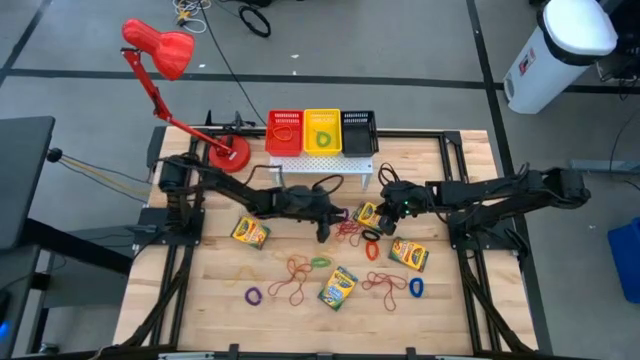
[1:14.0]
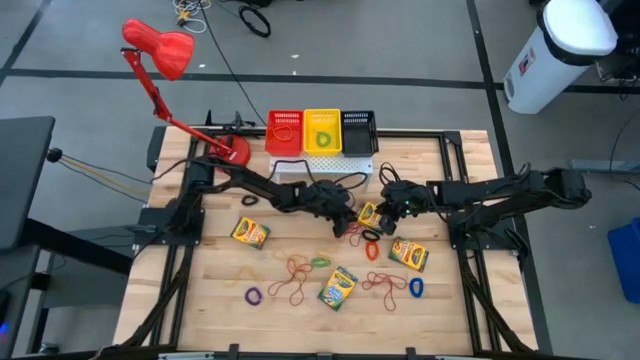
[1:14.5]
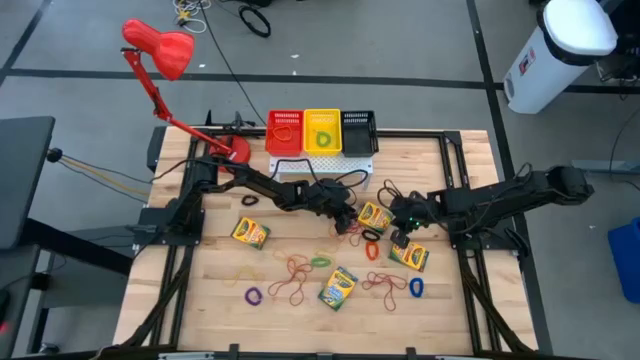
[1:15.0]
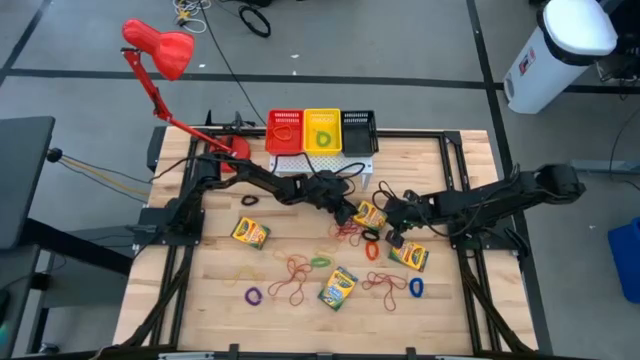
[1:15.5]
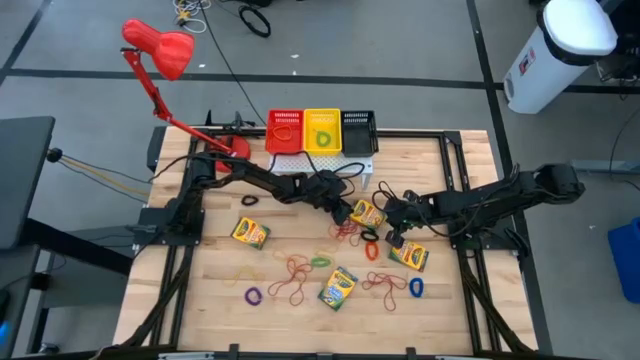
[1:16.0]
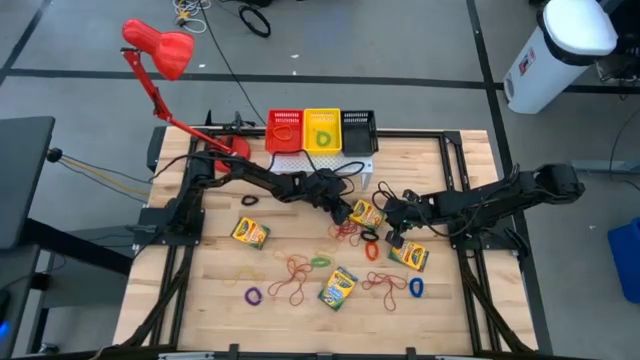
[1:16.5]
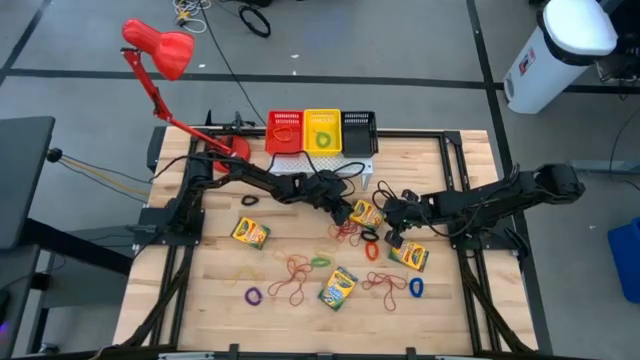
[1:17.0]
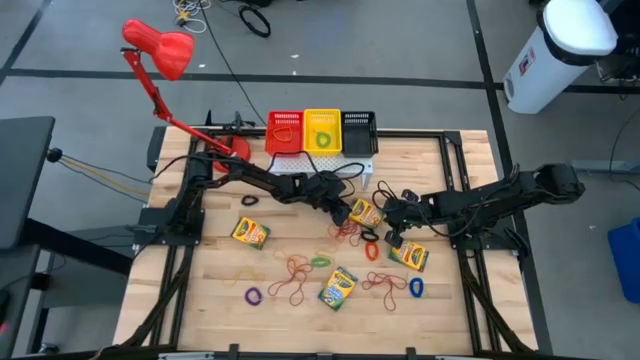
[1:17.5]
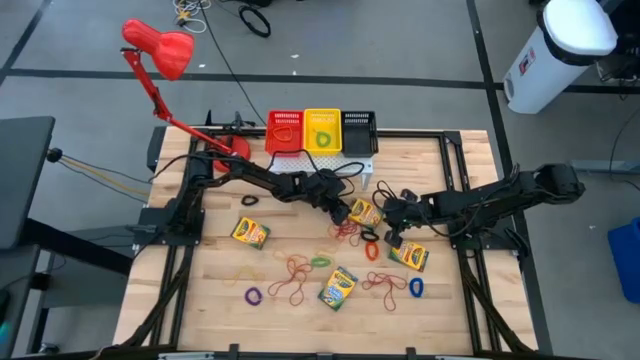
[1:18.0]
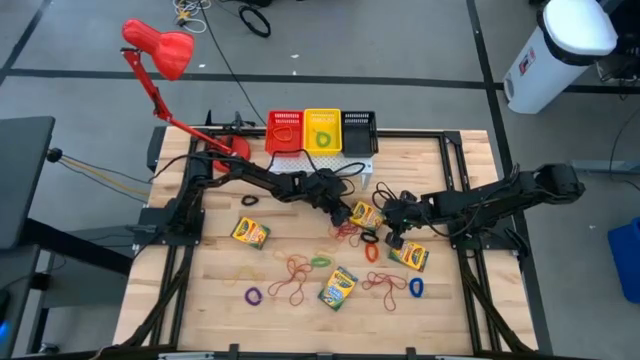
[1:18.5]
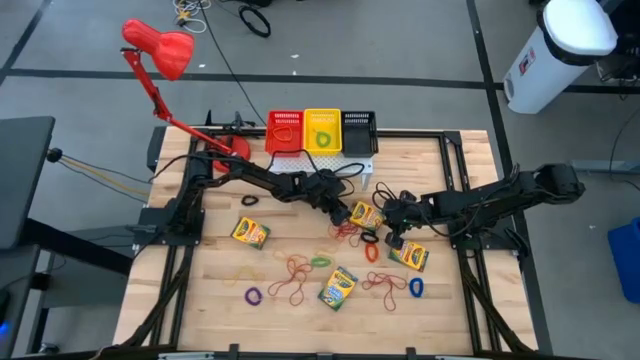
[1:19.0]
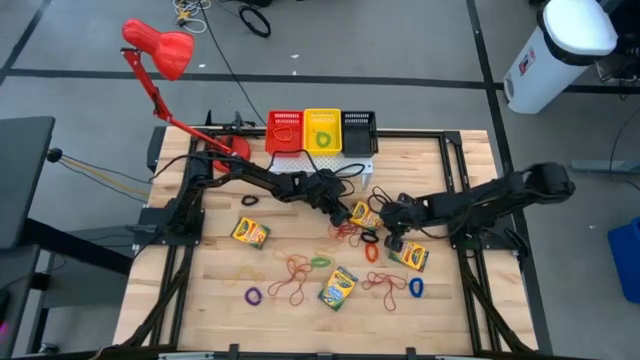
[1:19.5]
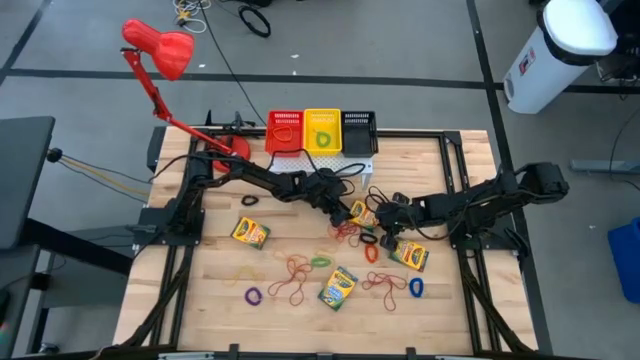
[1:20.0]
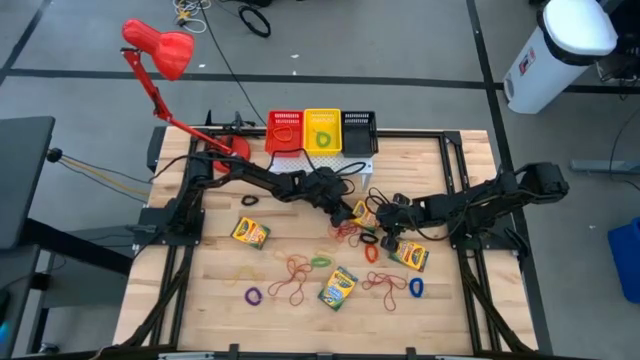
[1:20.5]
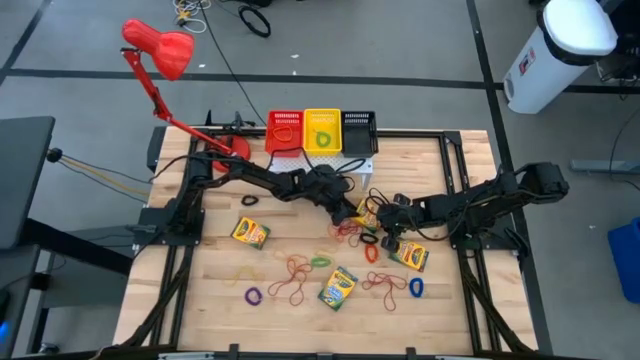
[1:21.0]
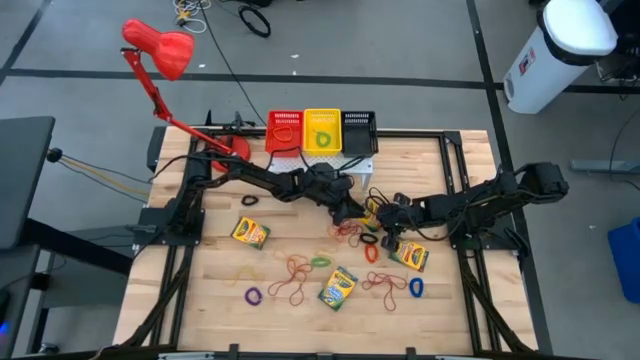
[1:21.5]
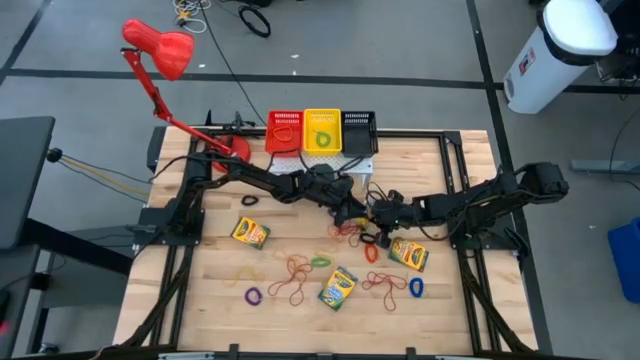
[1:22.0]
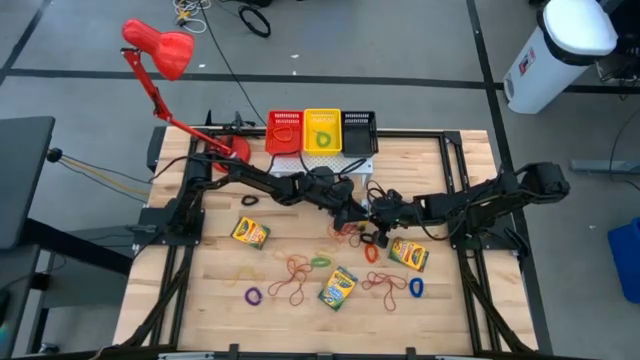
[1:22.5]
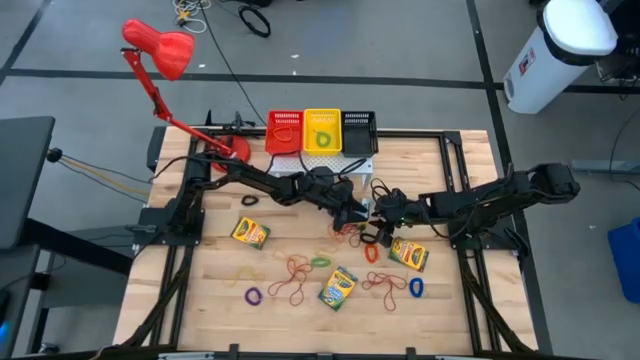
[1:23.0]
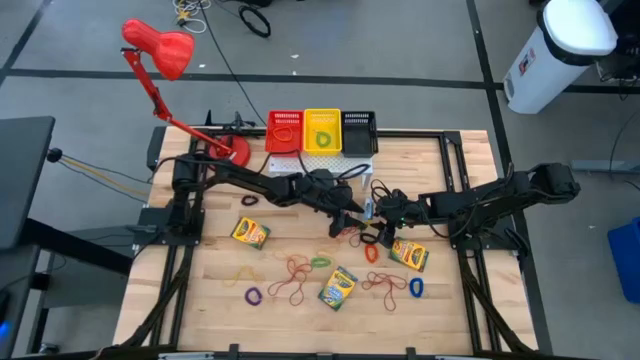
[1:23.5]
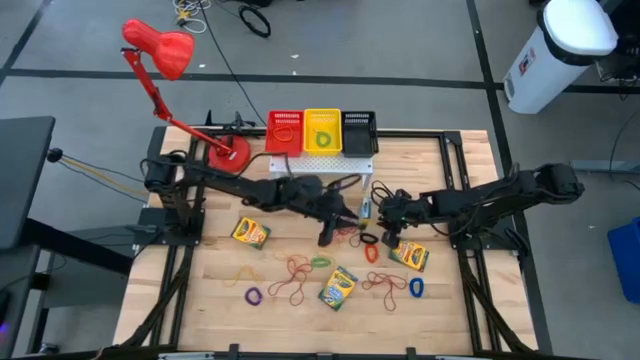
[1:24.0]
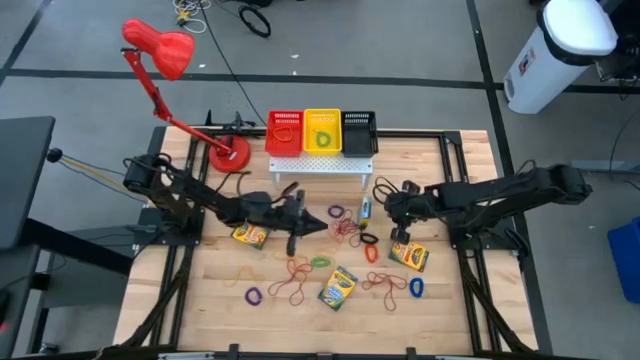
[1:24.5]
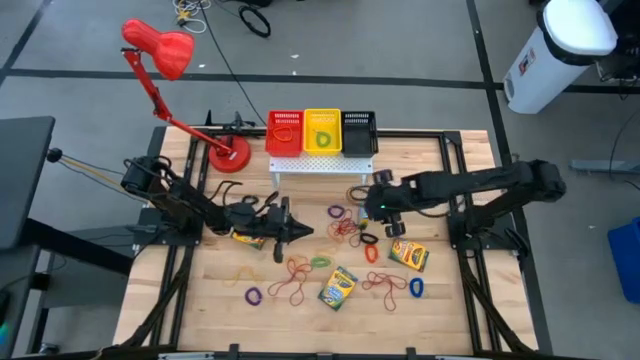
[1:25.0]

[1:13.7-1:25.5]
Task: Pick & Place Office Desk Supplies
Put the yellow crayon box into the black bin on the shelf

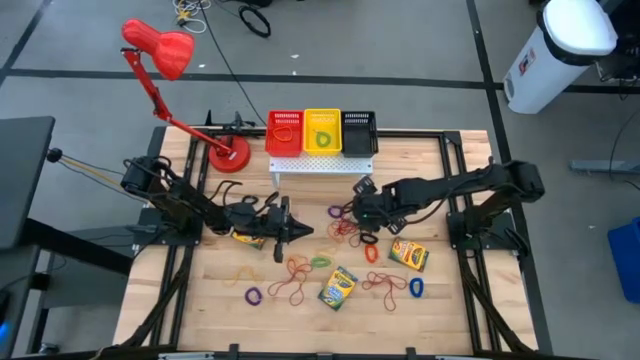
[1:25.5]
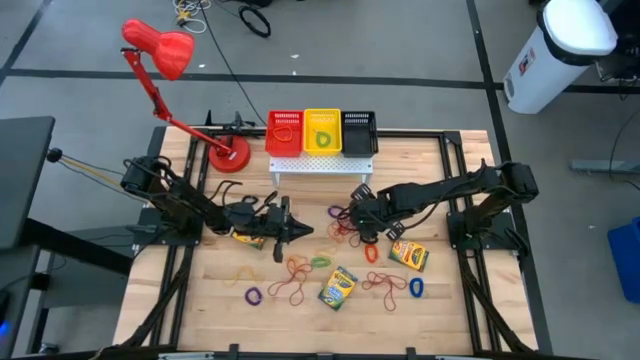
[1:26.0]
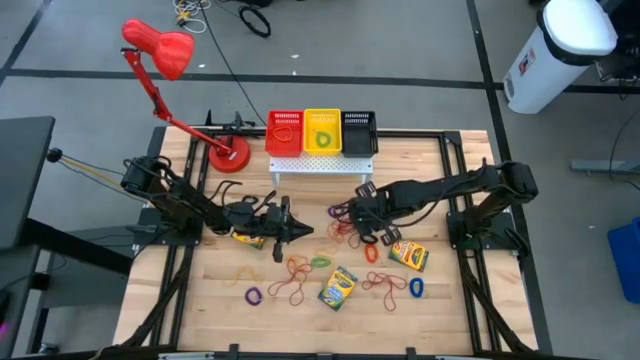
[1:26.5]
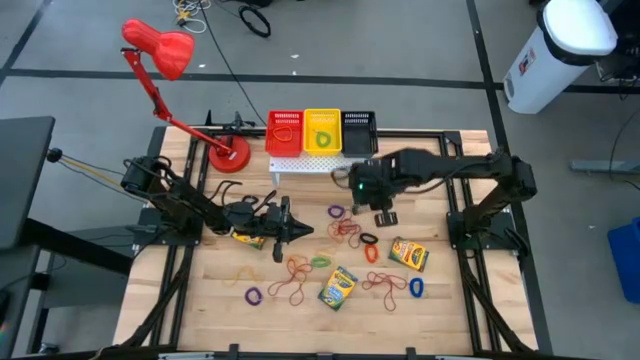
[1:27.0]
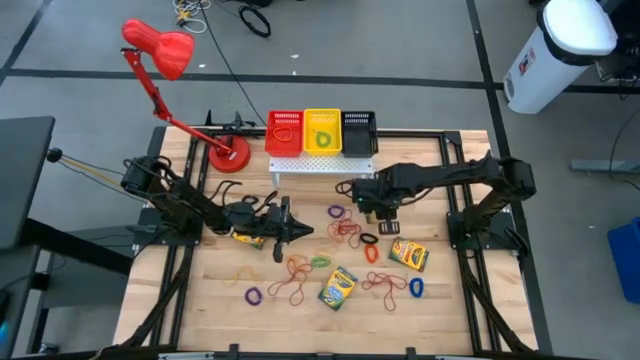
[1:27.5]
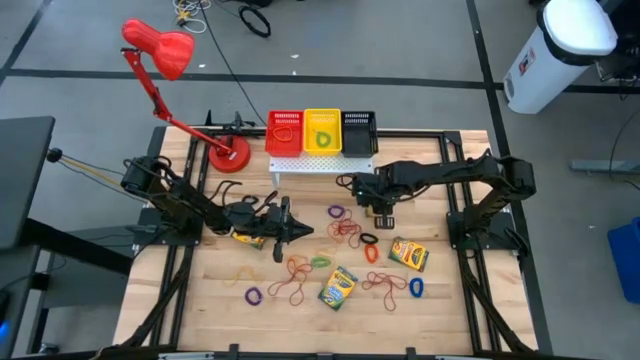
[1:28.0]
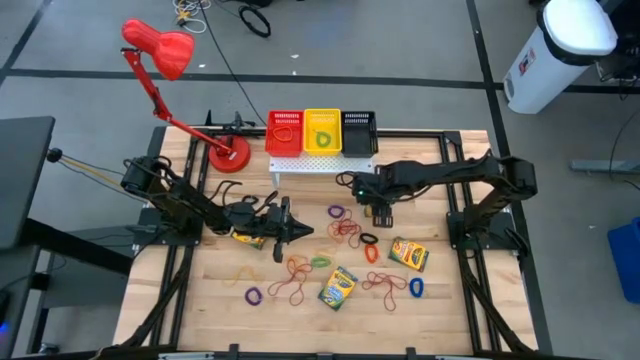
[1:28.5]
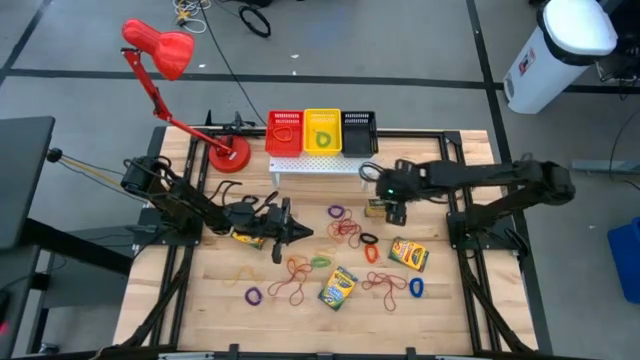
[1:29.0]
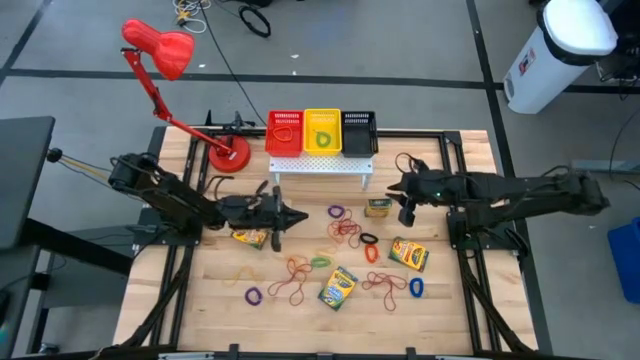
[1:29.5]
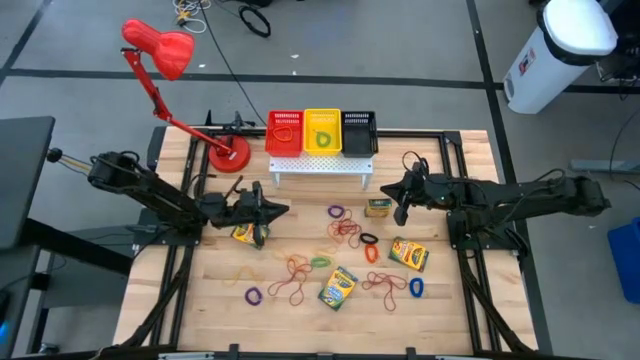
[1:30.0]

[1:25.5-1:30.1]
Put the yellow crayon box into the black bin on the shelf

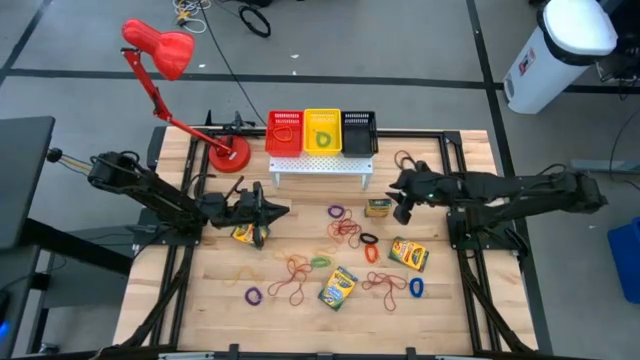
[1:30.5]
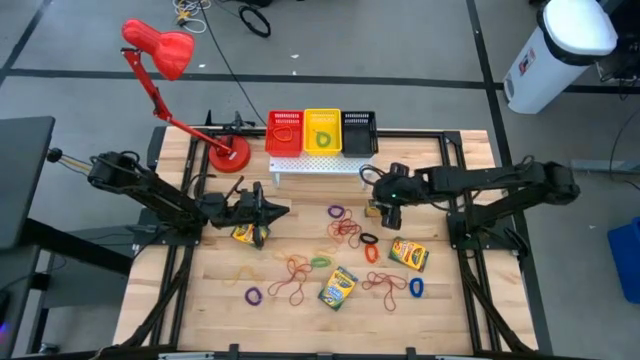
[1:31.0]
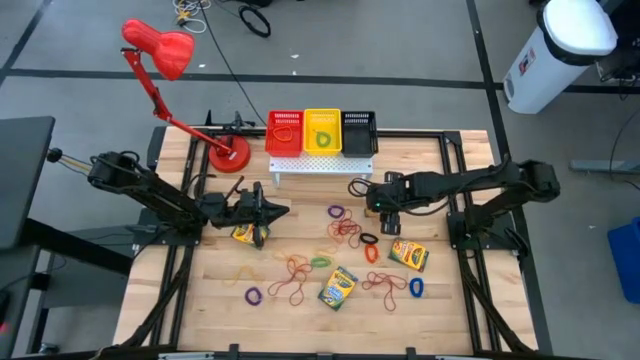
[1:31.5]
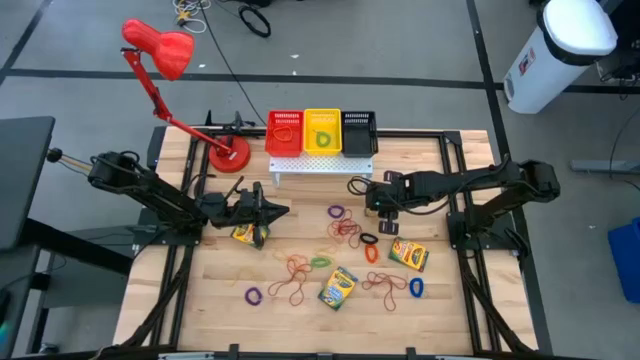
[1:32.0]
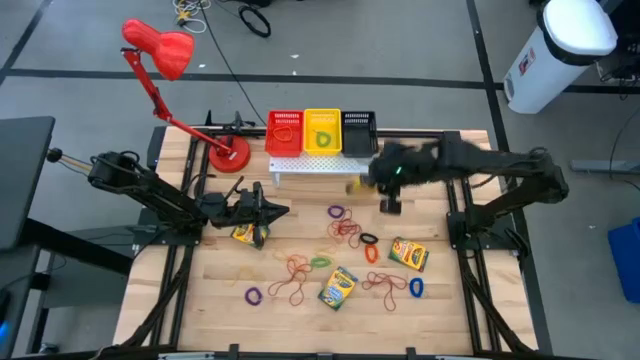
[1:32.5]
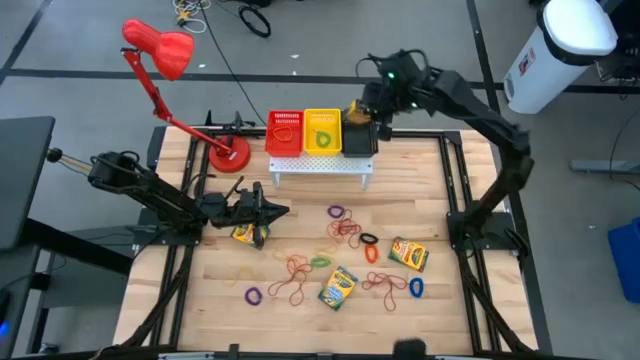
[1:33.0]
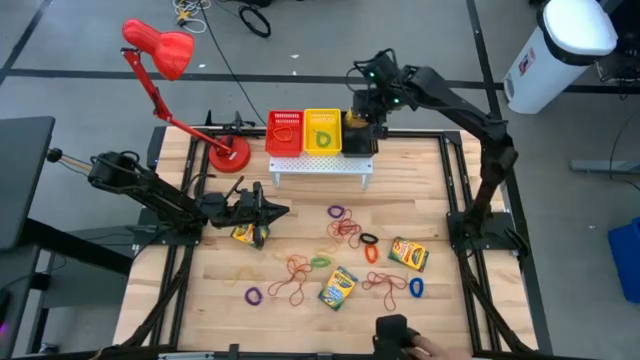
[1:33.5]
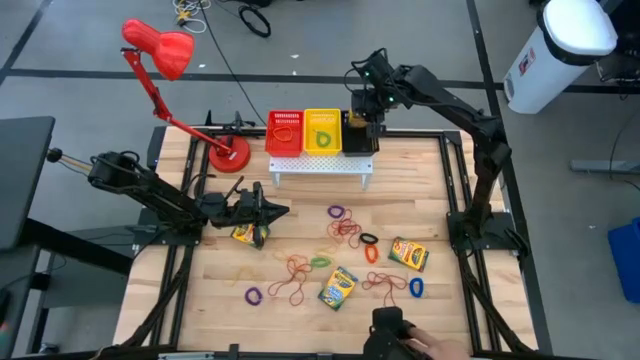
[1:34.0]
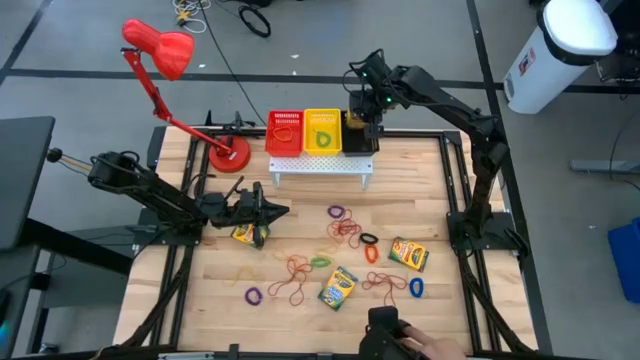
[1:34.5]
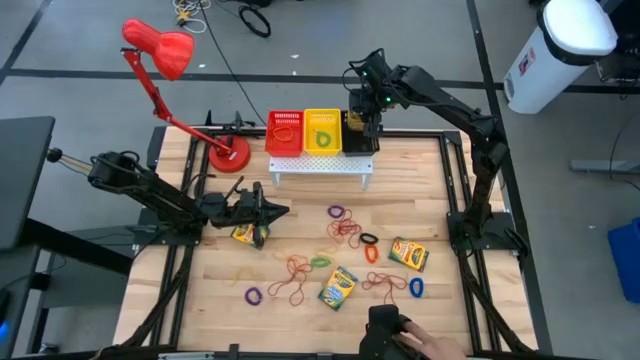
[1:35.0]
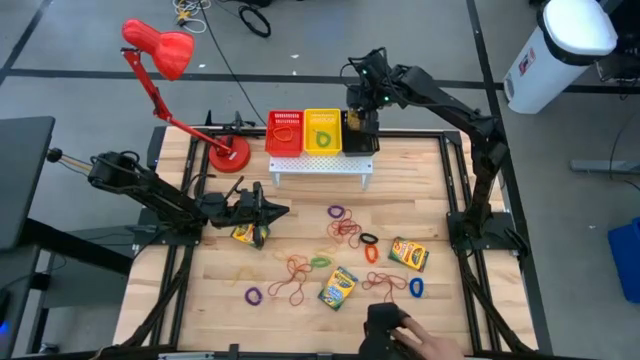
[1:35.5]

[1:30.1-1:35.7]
Put the yellow crayon box into the black bin on the shelf
